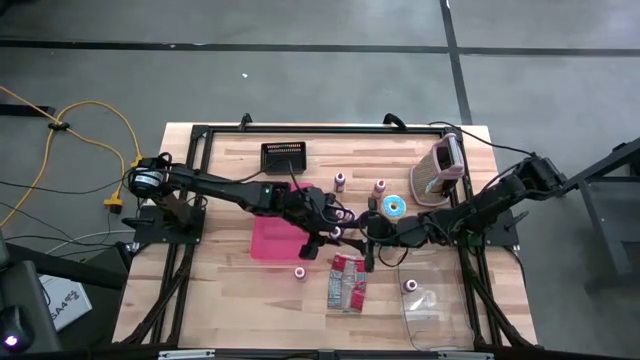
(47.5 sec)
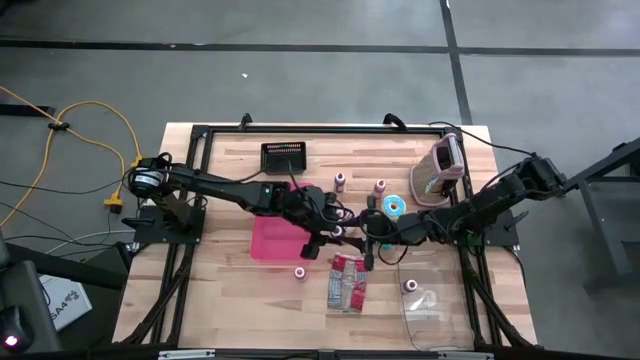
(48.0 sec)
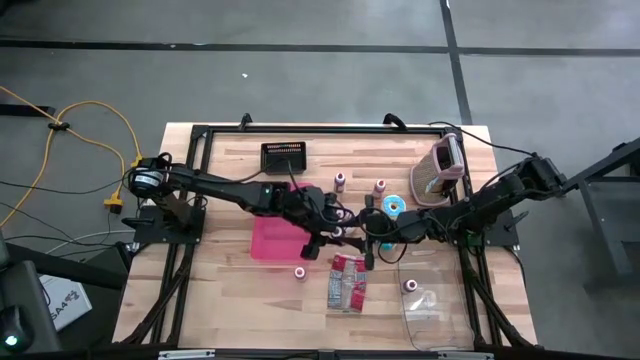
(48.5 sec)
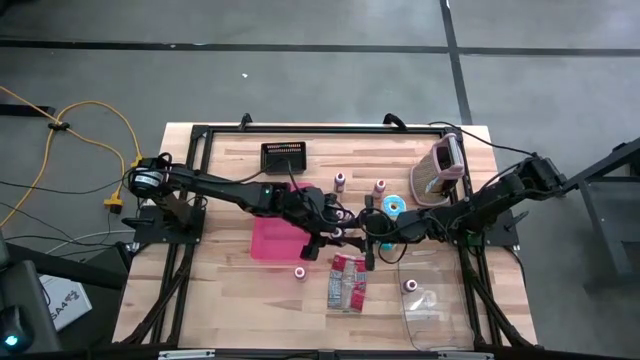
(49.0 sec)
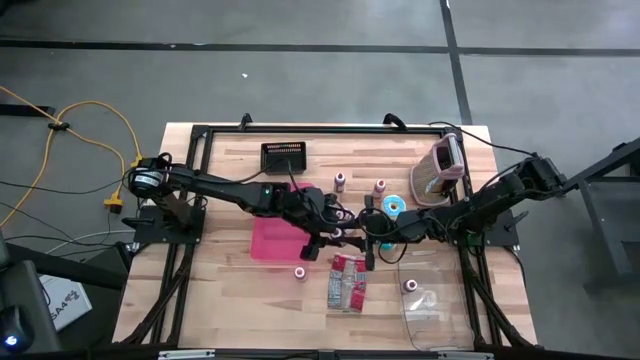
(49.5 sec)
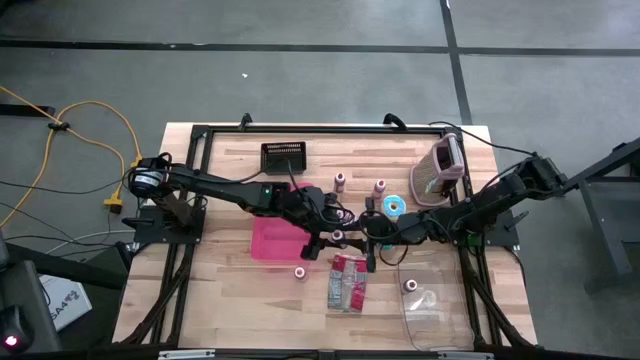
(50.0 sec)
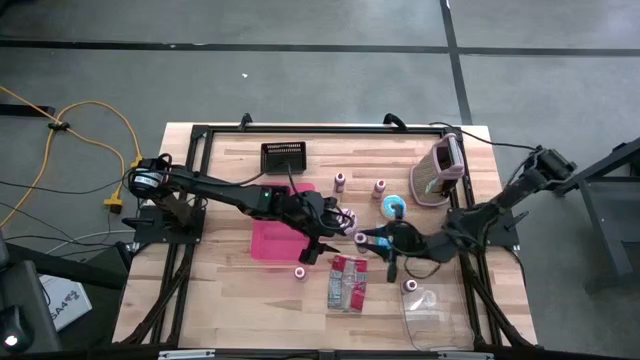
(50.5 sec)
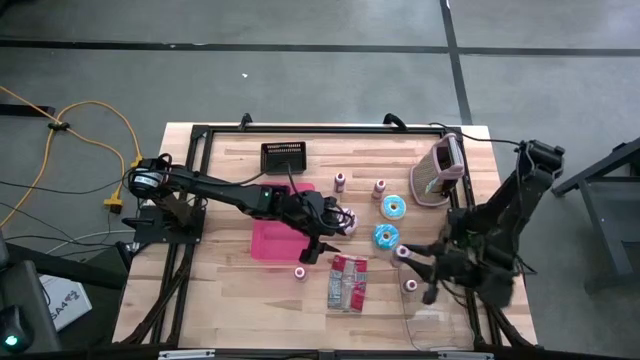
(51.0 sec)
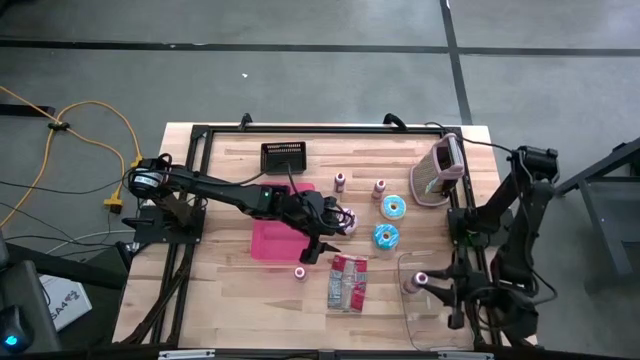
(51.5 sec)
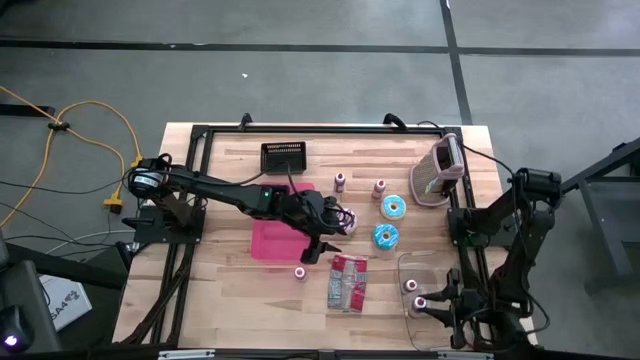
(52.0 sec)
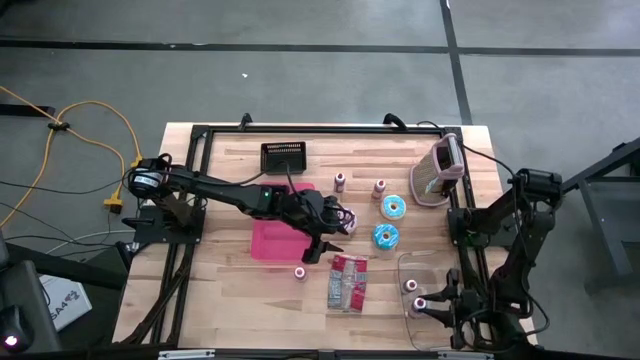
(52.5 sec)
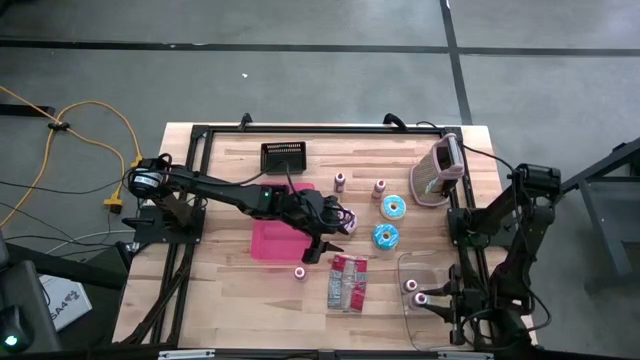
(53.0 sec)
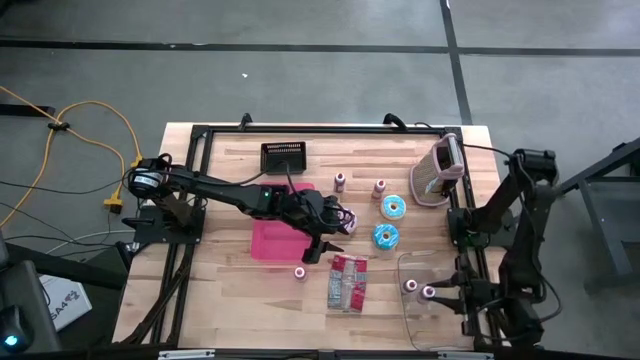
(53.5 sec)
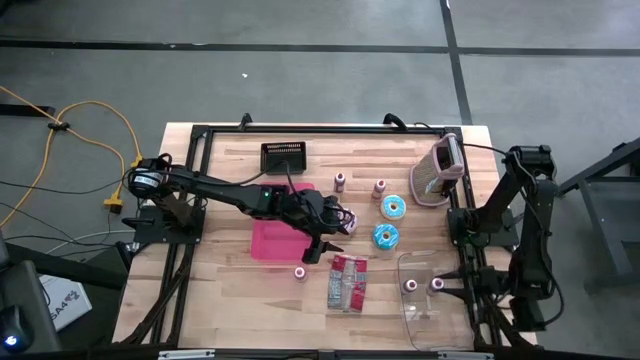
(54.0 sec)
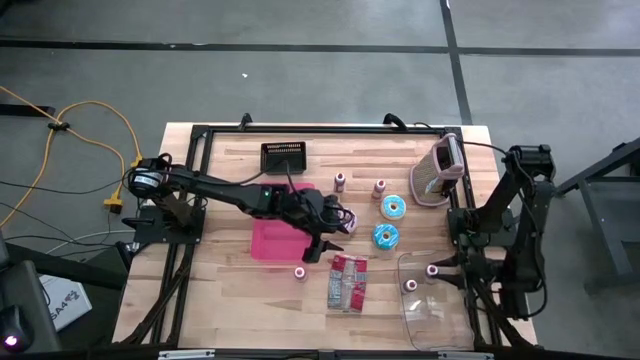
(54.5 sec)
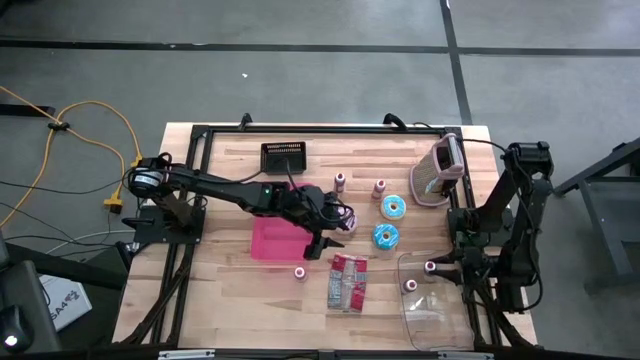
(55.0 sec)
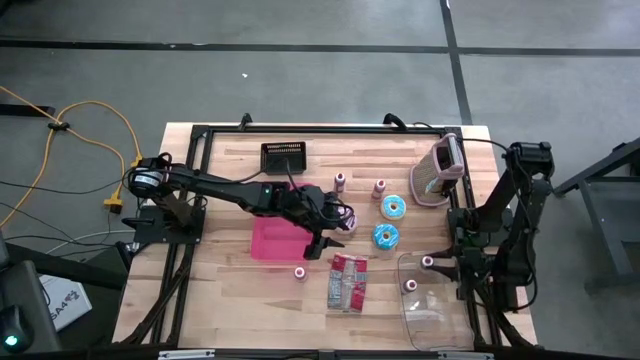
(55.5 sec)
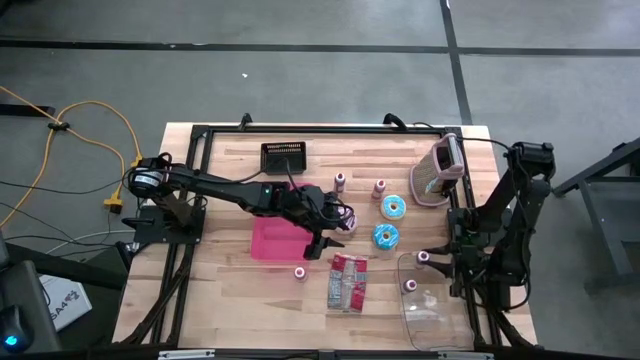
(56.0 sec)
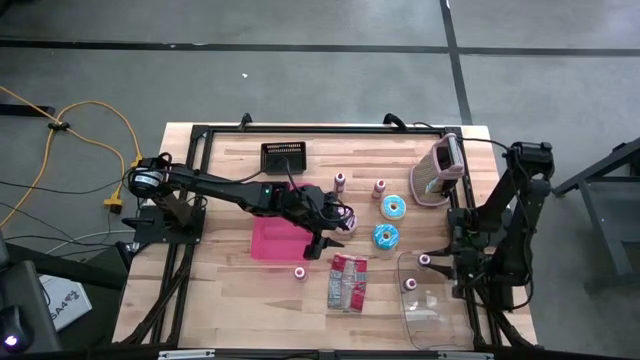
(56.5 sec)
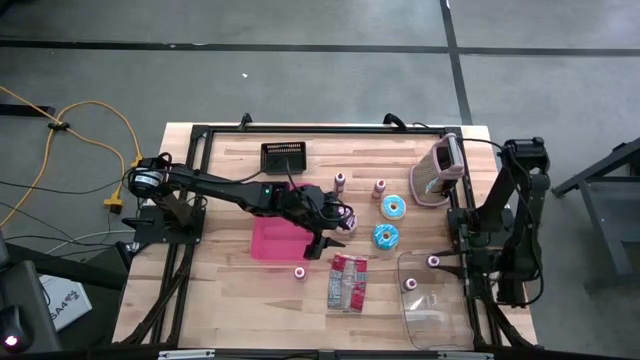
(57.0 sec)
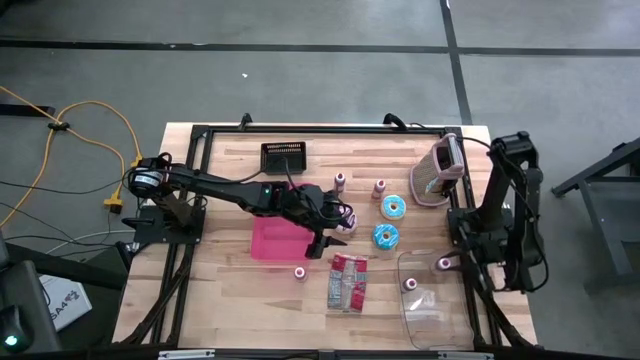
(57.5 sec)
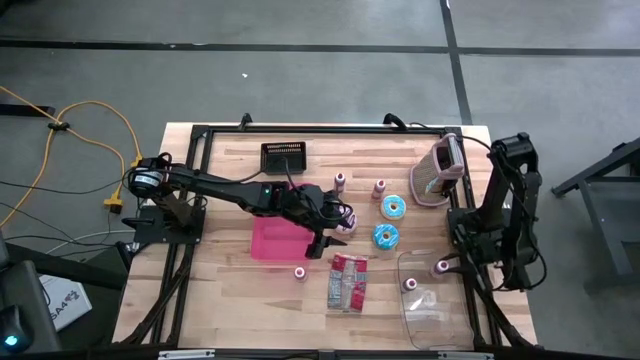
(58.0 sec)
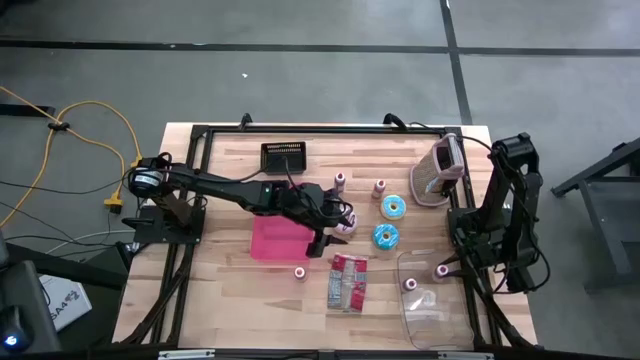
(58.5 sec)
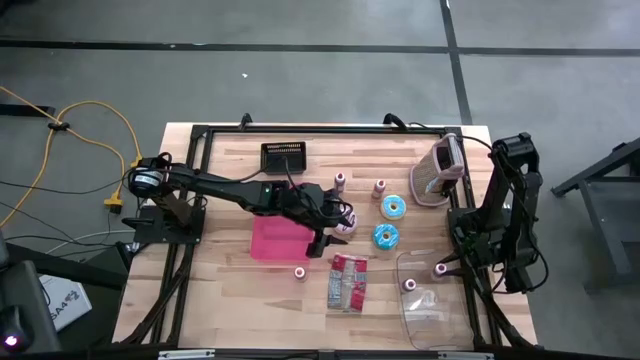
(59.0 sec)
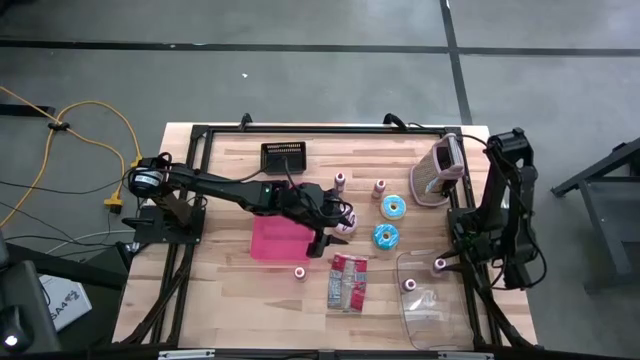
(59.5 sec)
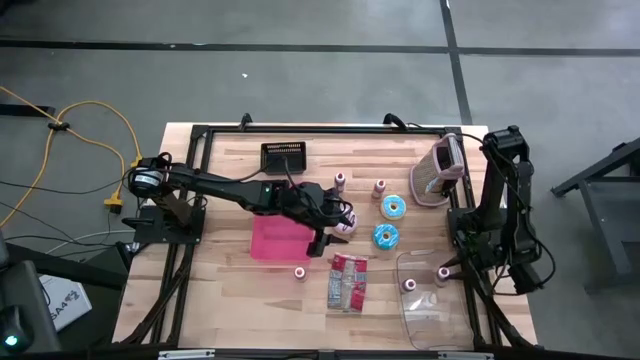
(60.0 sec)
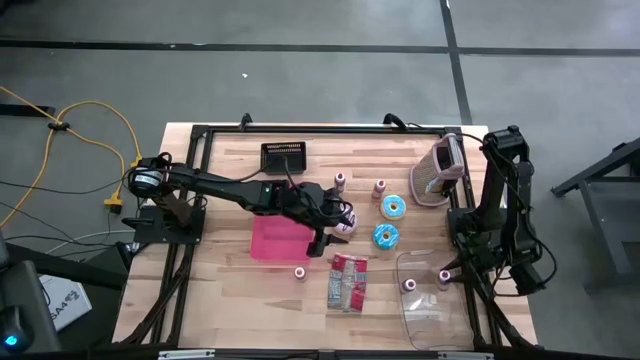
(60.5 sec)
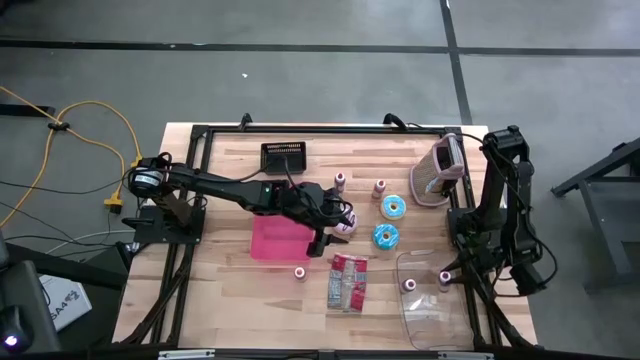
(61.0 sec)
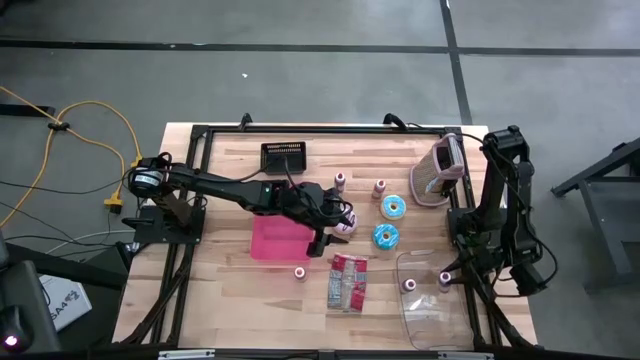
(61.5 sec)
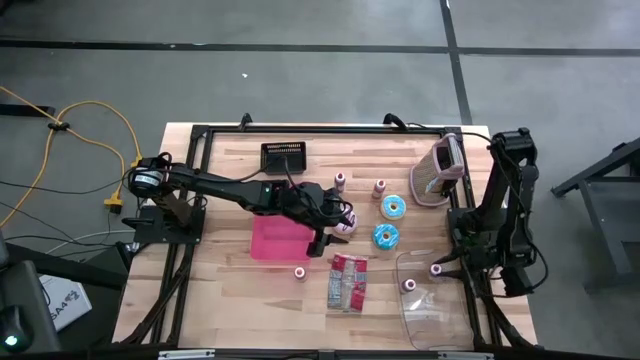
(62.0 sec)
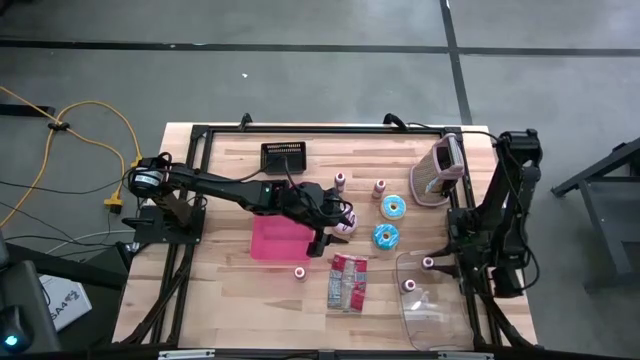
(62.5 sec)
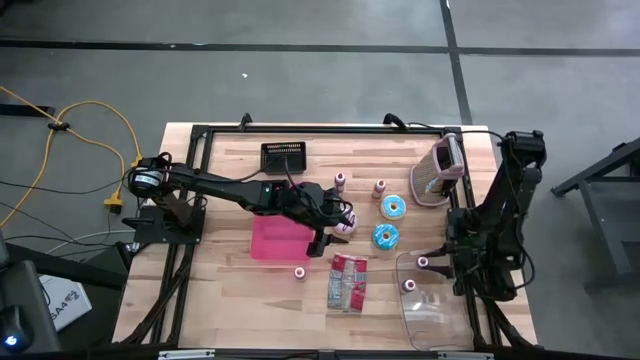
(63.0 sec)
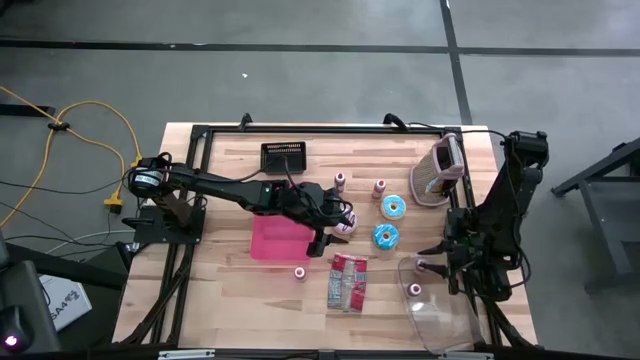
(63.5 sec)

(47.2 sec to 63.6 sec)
Put the bottom red food coloring bottle into the transparent bin

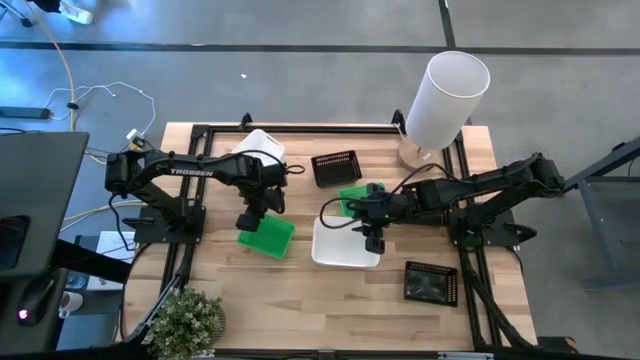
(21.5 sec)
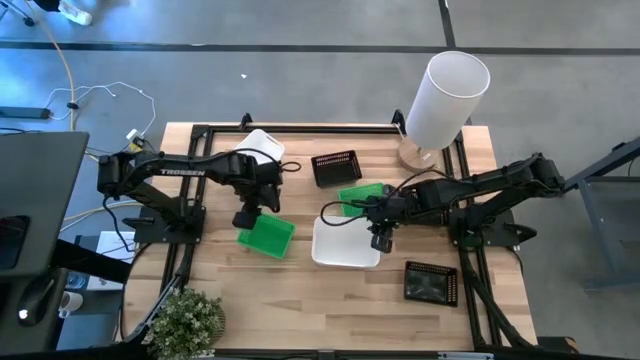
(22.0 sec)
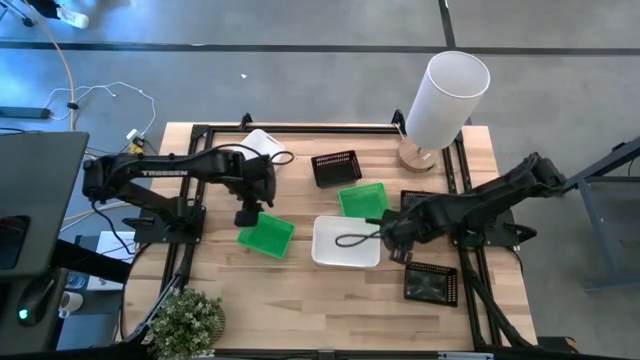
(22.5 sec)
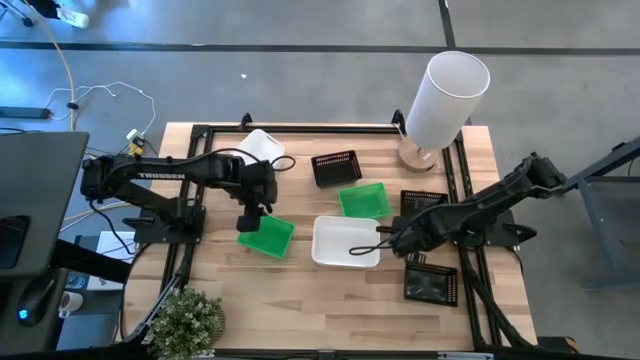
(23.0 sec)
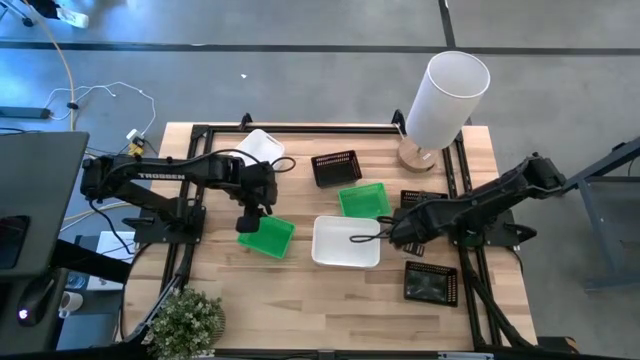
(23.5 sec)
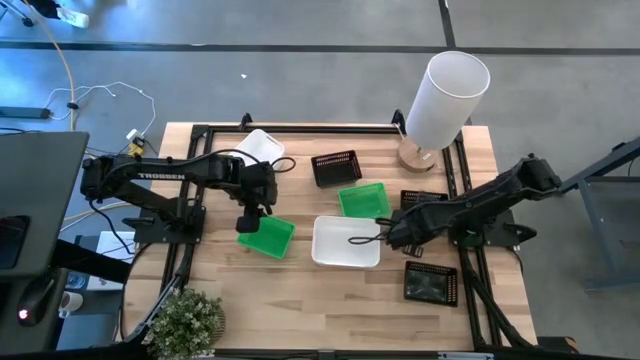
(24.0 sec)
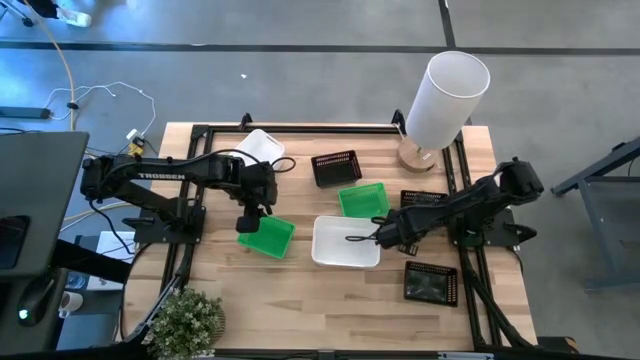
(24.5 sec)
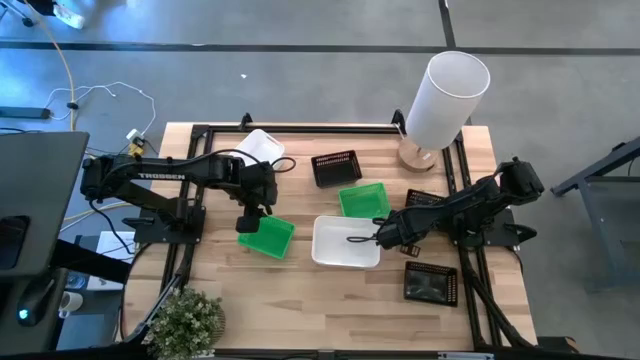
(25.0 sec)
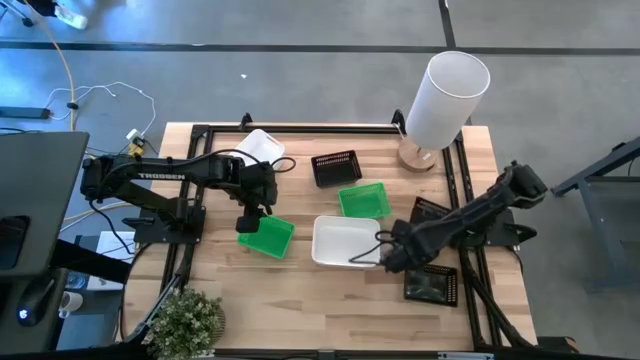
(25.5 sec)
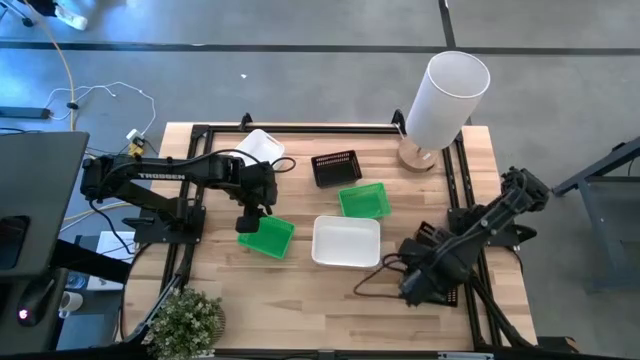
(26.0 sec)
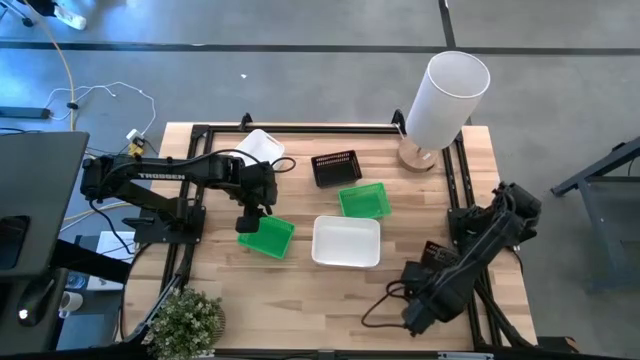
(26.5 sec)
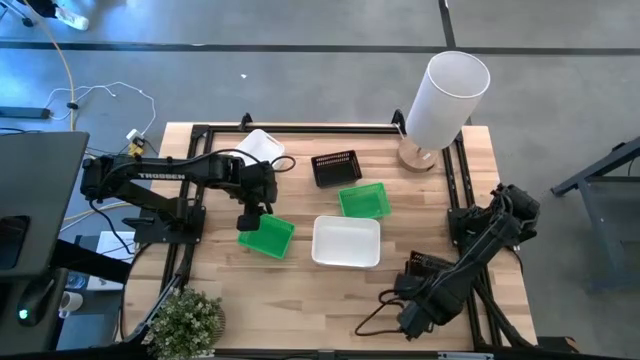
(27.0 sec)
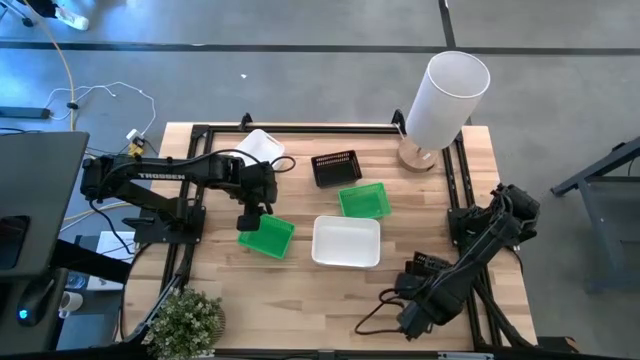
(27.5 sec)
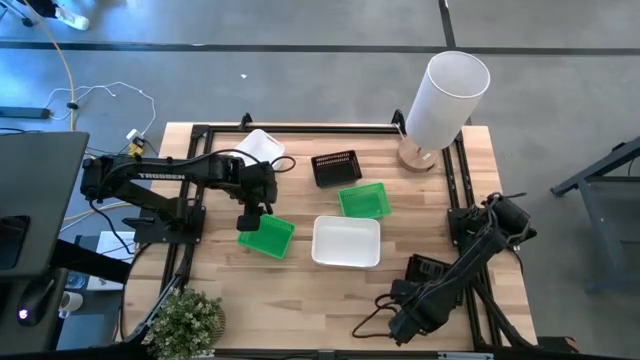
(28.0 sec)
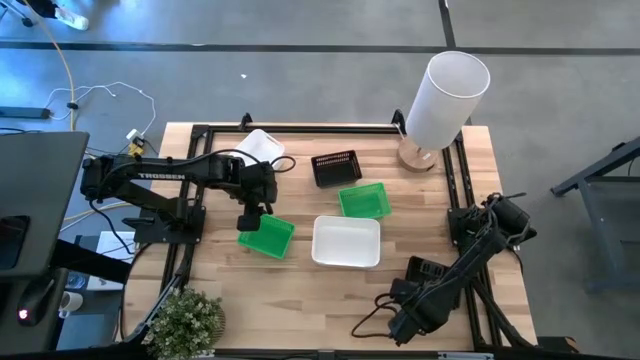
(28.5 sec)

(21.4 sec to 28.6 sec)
Stack the middle black bin on the bottom black bin
